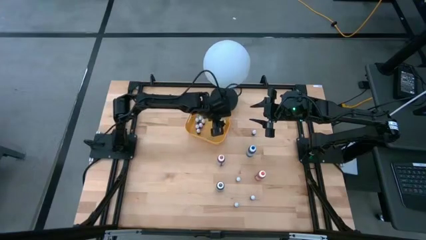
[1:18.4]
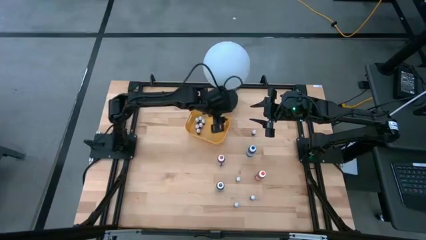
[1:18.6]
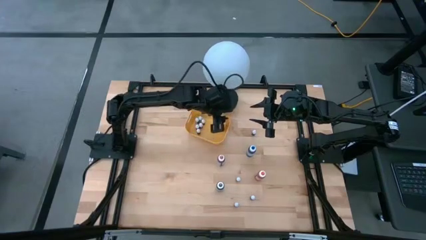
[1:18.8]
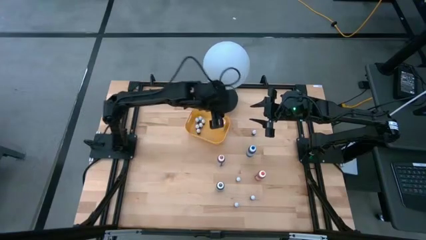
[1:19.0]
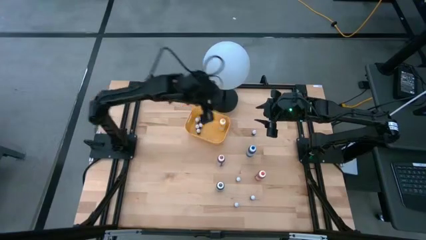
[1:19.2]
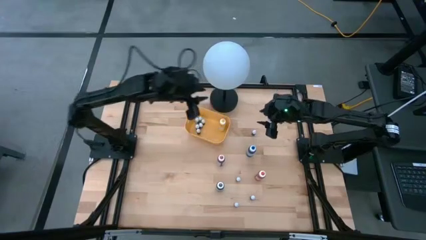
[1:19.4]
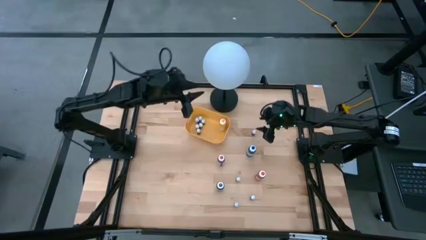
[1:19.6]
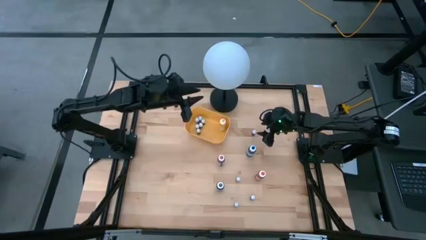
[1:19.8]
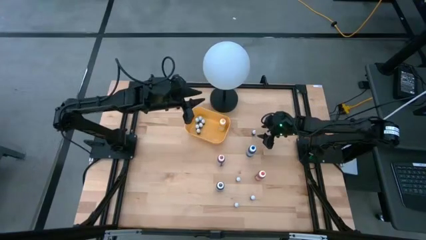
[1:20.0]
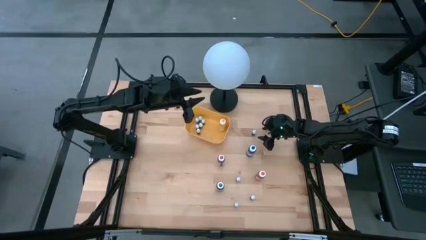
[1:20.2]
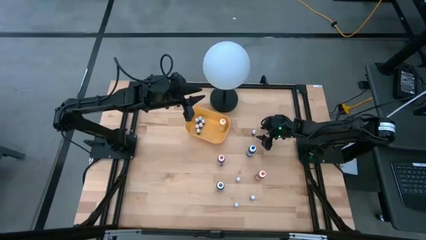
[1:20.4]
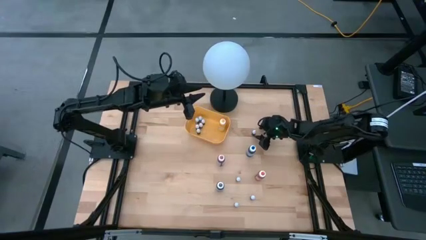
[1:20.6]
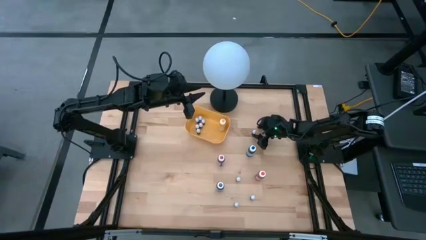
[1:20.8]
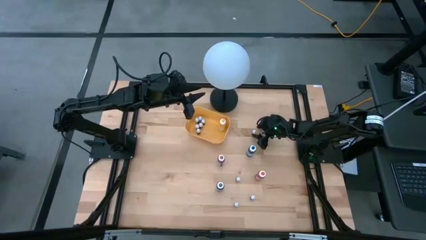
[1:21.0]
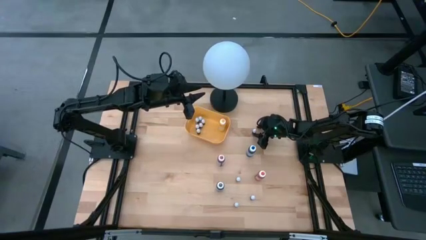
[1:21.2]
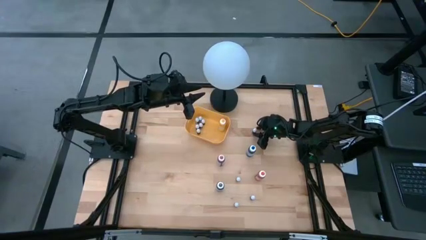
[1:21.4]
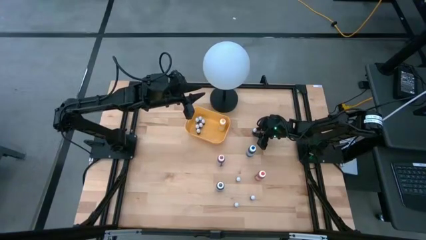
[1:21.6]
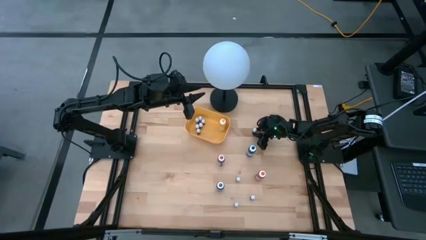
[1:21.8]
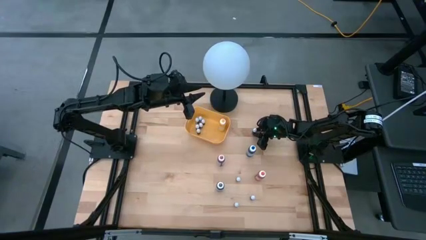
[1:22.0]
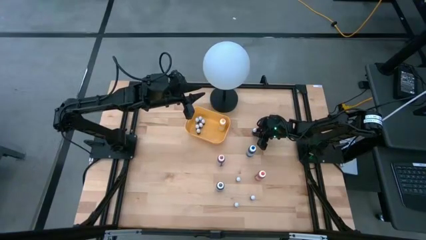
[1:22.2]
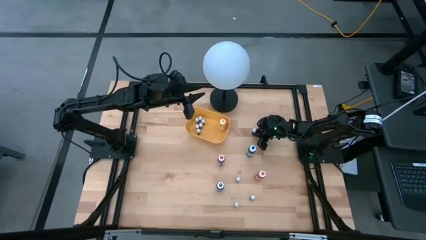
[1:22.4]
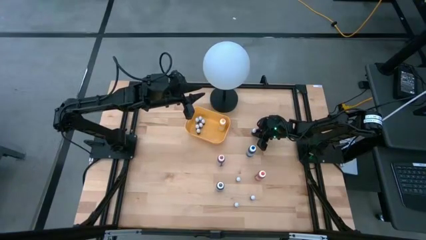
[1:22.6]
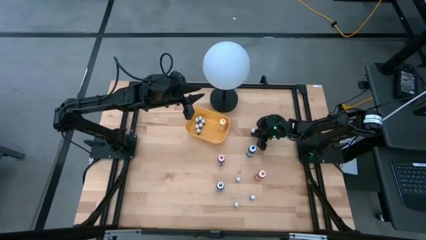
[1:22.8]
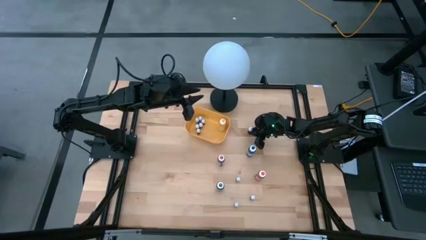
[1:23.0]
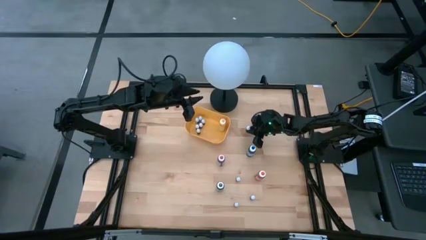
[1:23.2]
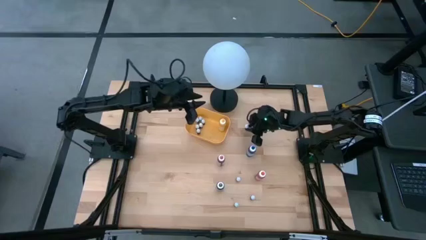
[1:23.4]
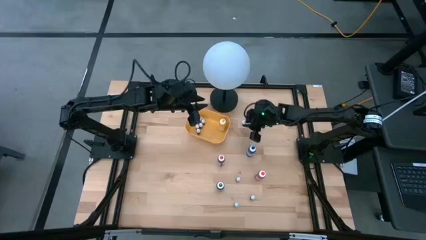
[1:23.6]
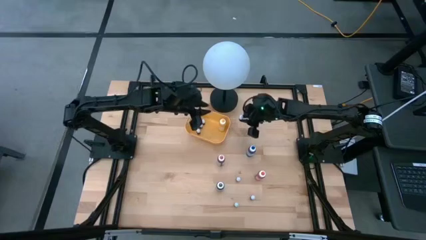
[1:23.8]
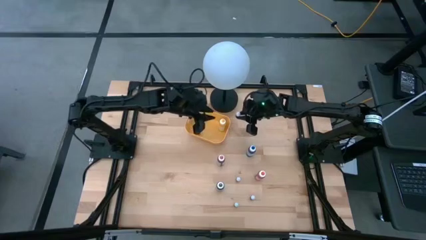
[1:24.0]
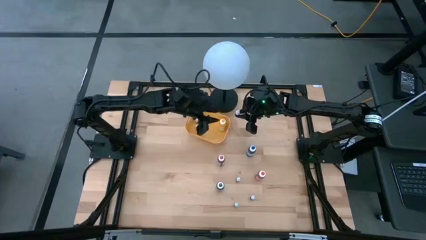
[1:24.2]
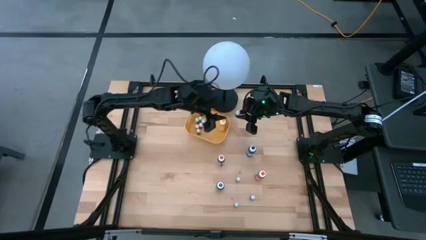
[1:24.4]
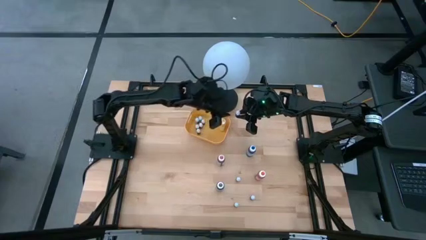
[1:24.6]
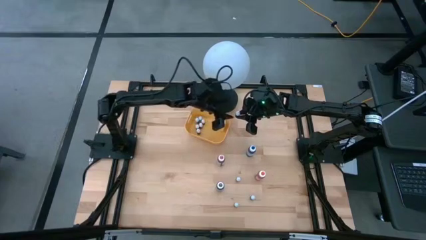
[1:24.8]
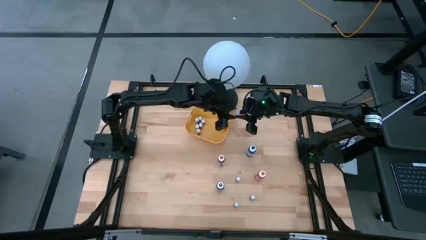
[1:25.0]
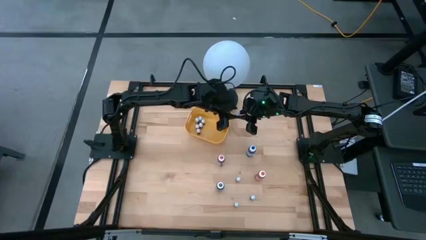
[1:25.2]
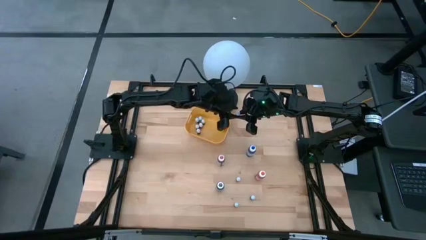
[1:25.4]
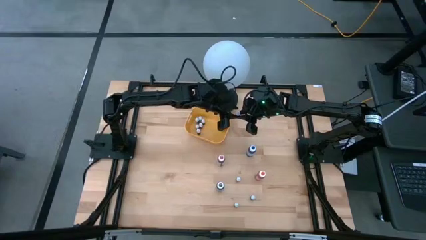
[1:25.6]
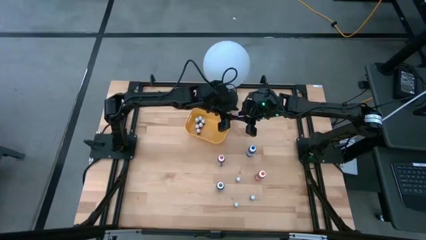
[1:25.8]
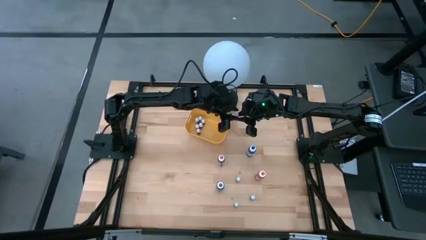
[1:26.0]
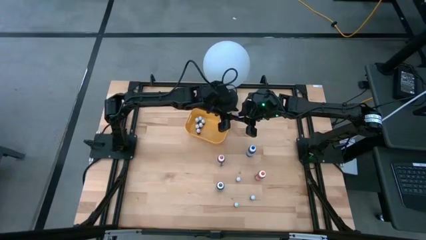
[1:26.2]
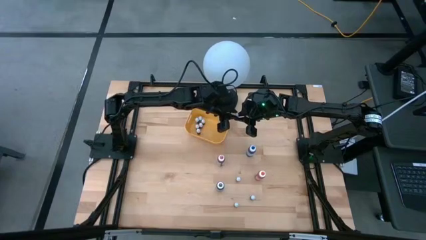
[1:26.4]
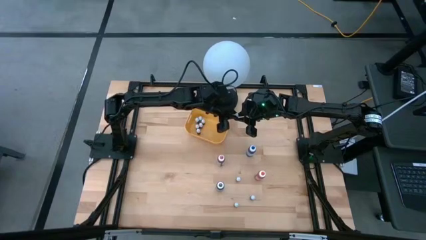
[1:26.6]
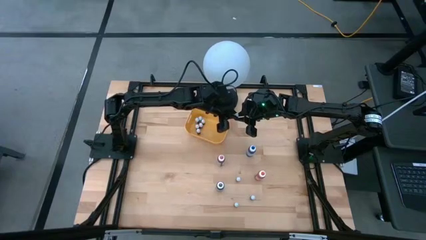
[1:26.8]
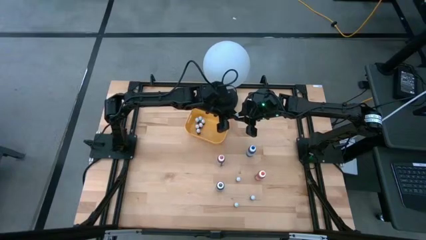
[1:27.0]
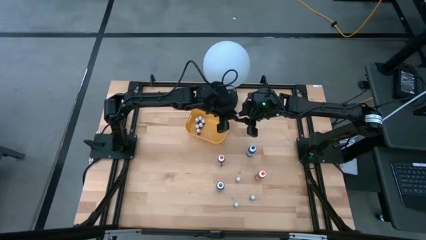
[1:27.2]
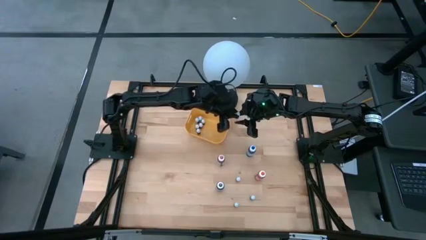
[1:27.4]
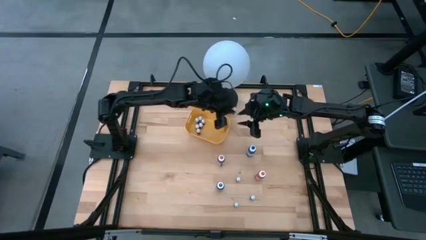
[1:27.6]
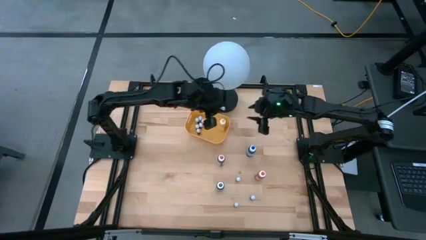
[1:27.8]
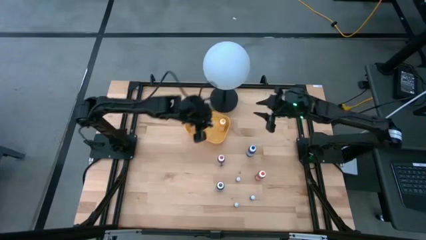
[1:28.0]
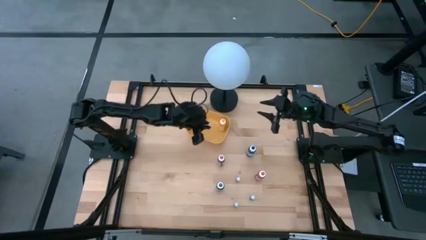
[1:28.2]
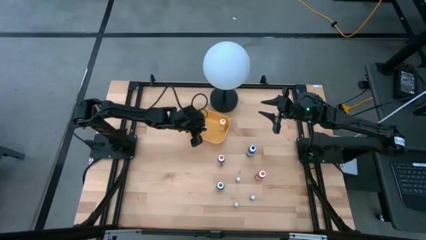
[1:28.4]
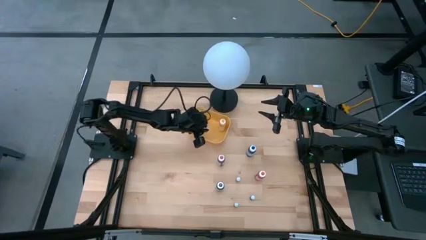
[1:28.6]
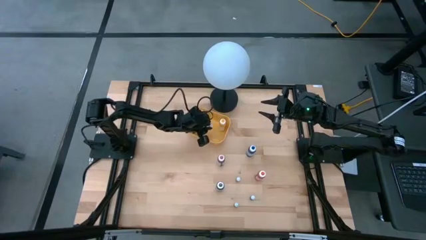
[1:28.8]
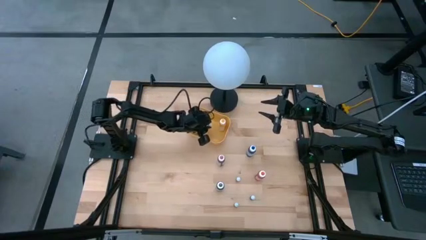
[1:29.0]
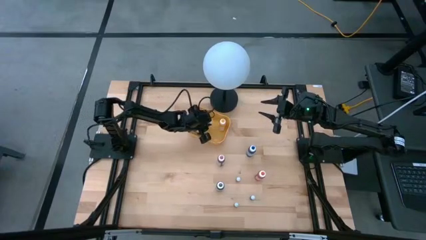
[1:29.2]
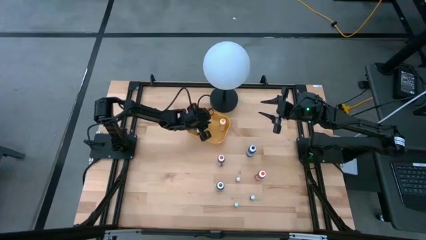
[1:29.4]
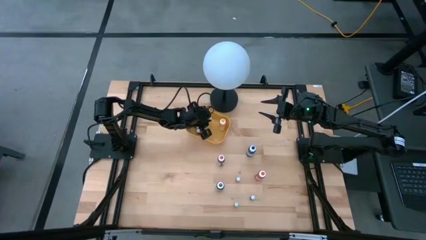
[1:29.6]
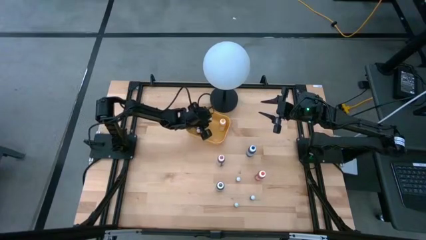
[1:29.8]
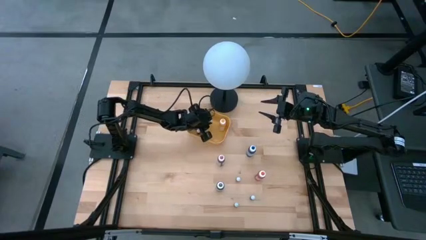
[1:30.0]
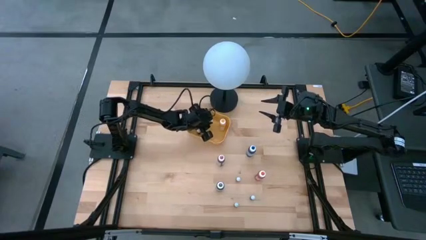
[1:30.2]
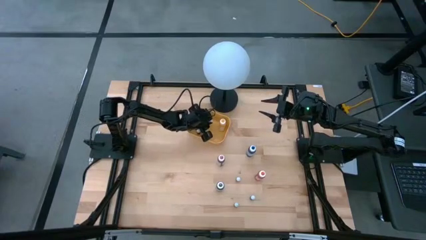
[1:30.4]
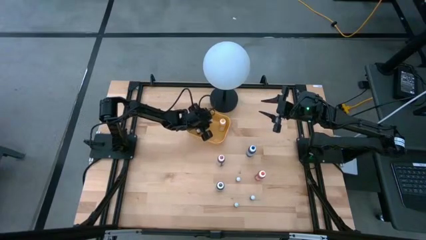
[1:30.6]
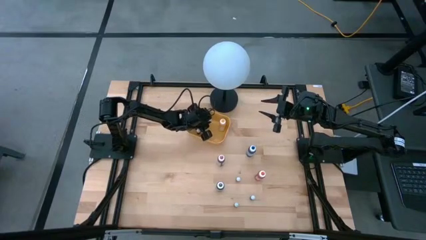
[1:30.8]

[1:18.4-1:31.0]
Task: Pick & Place food coloring
Put the small light blue food coloring bottle into the yellow bin

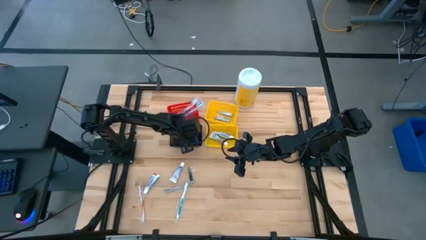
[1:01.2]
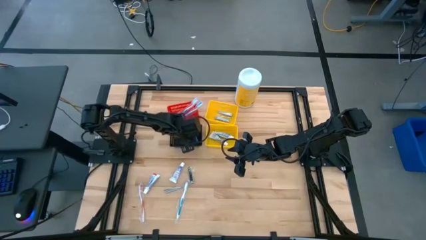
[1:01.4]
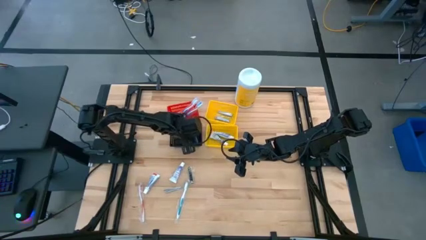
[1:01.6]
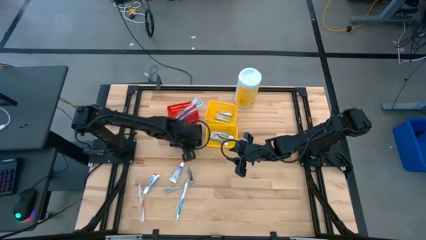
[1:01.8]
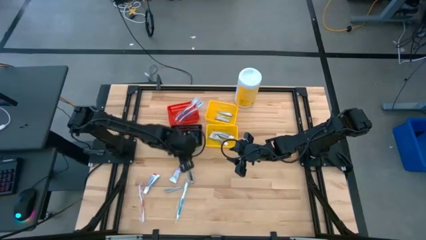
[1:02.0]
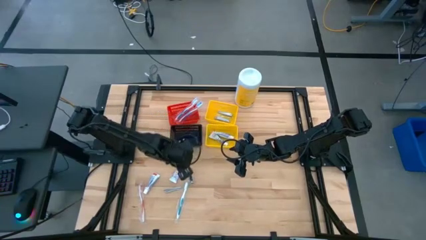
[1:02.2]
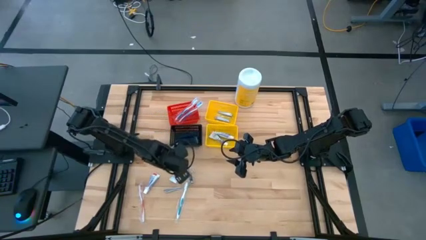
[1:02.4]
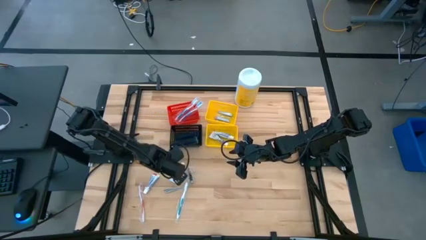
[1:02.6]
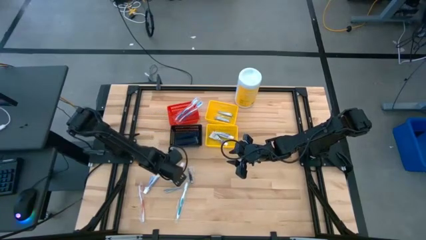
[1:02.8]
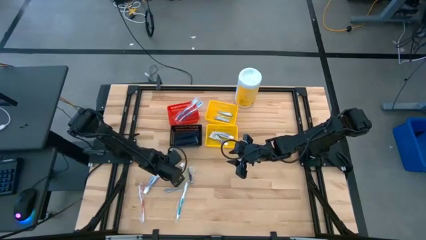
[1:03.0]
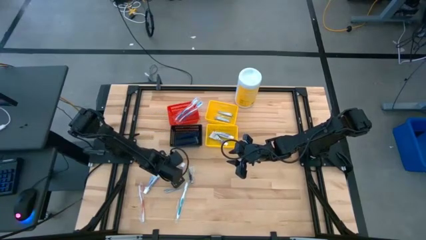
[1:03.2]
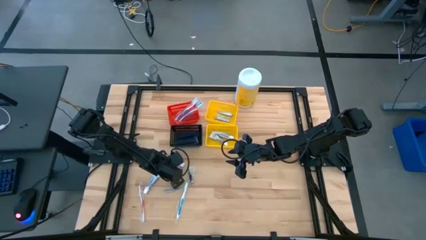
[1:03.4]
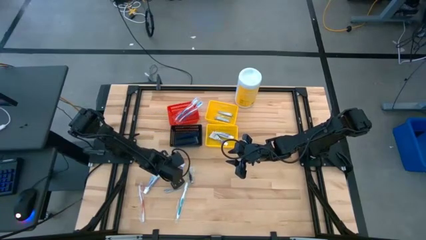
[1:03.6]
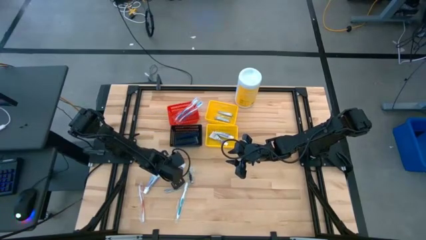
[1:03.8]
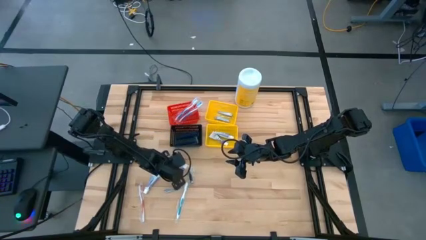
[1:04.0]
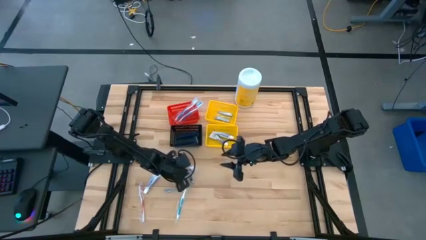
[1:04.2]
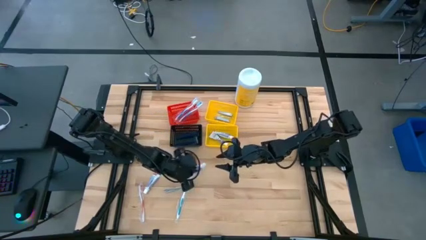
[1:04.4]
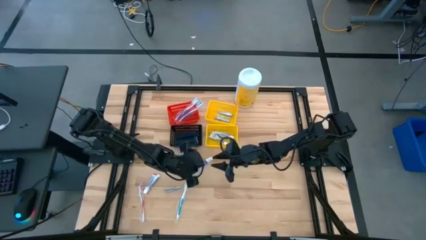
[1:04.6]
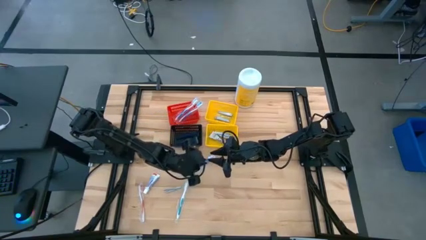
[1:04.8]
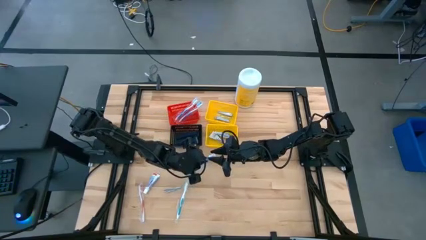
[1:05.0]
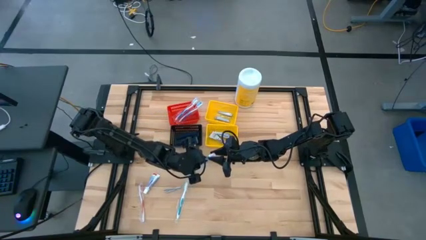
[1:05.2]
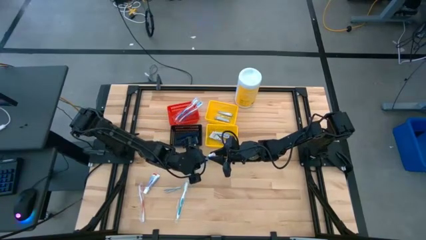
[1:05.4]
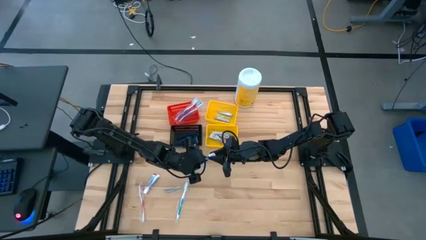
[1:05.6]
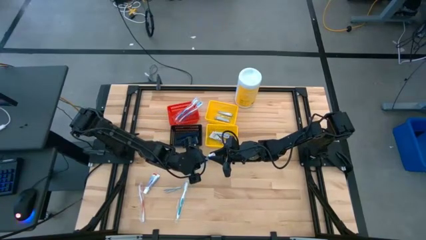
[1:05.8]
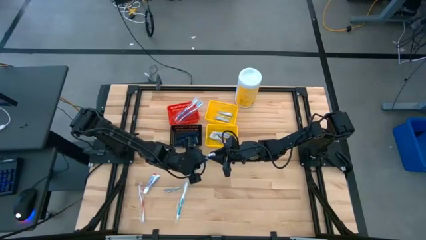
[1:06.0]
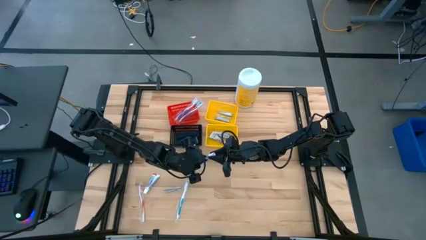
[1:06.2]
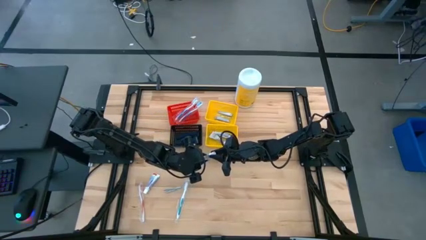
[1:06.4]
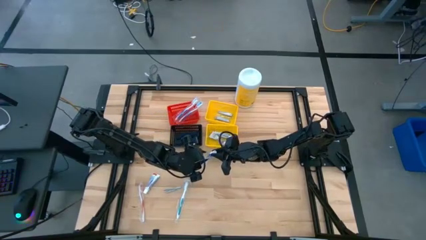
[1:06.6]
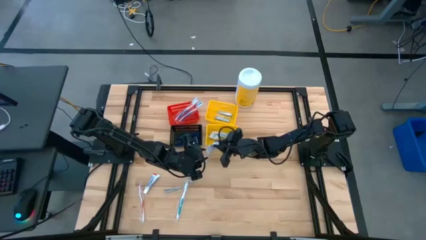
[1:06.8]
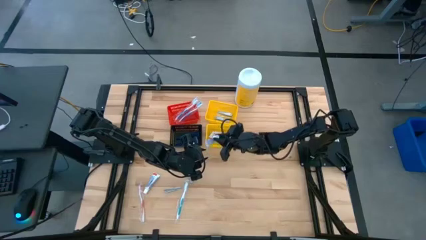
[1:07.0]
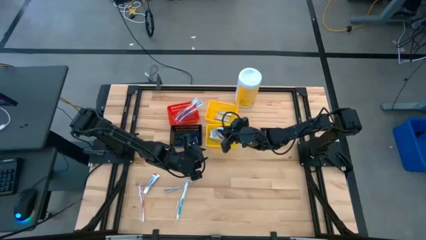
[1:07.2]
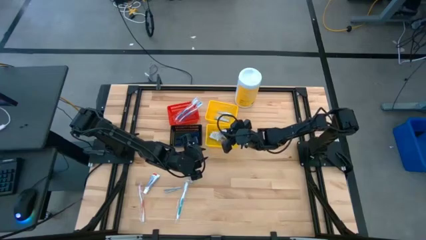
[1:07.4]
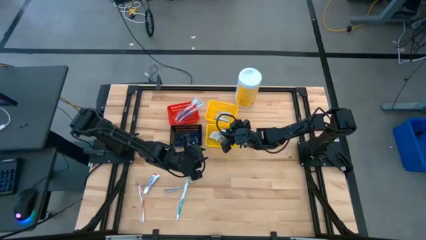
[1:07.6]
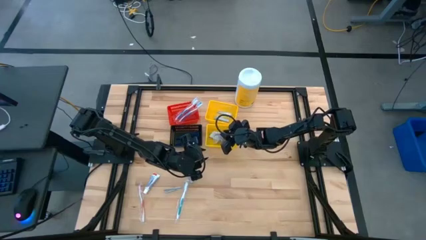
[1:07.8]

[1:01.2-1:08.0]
Task: Pick & Place Travel size toiletries
Put the white toothpaste into the bottom yellow bin
